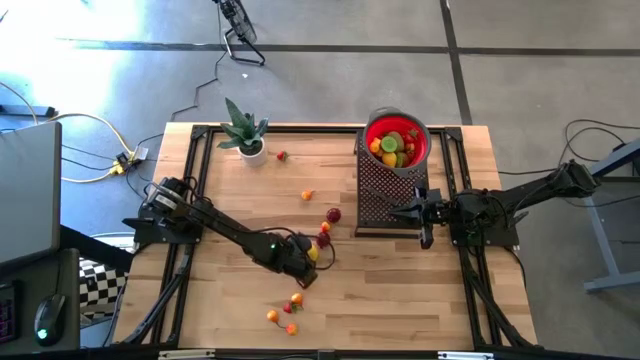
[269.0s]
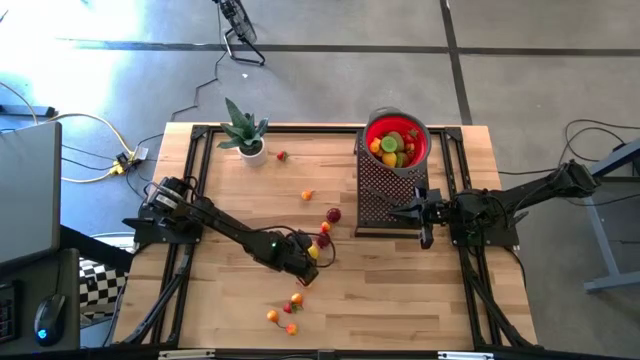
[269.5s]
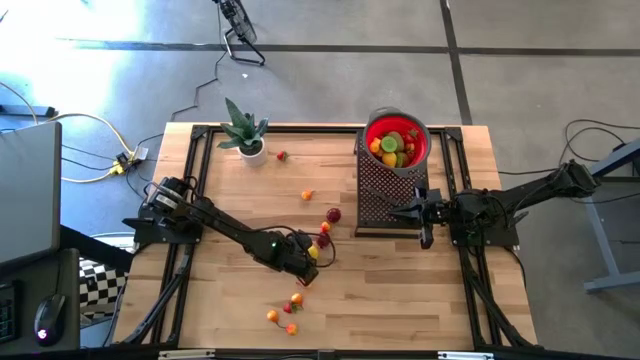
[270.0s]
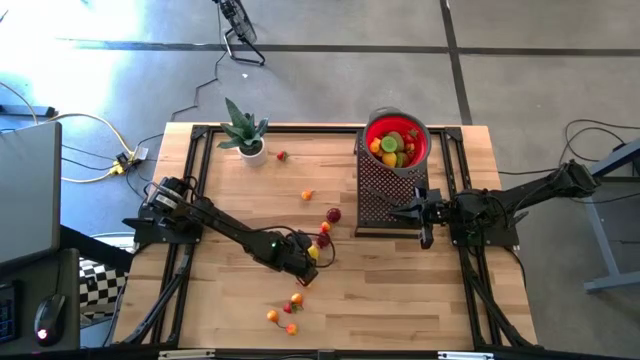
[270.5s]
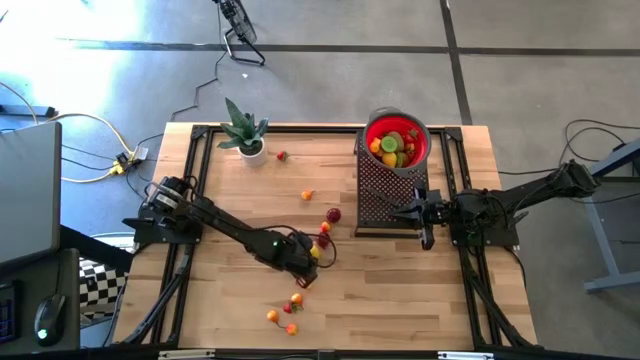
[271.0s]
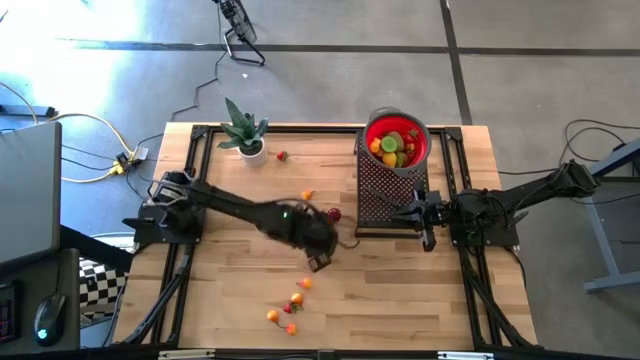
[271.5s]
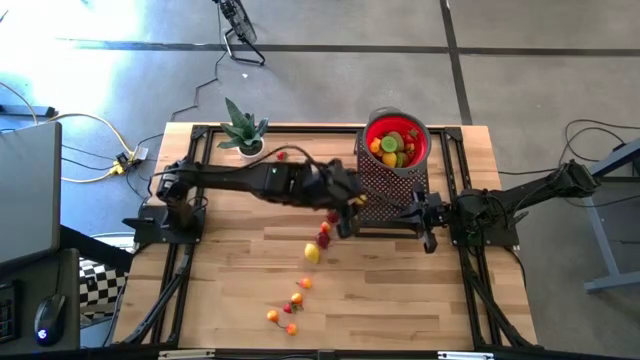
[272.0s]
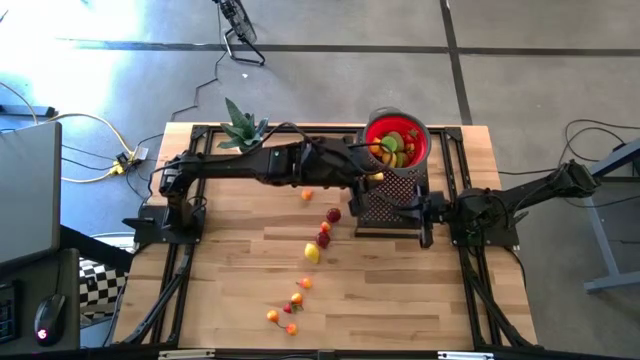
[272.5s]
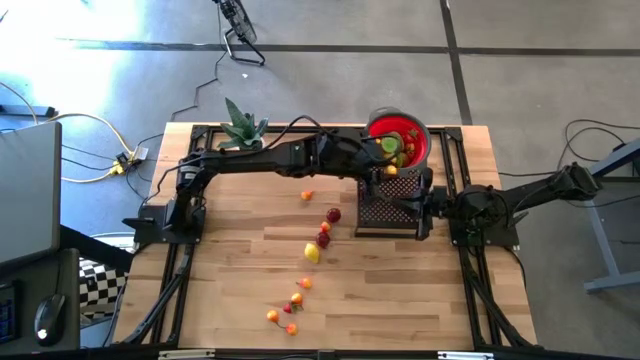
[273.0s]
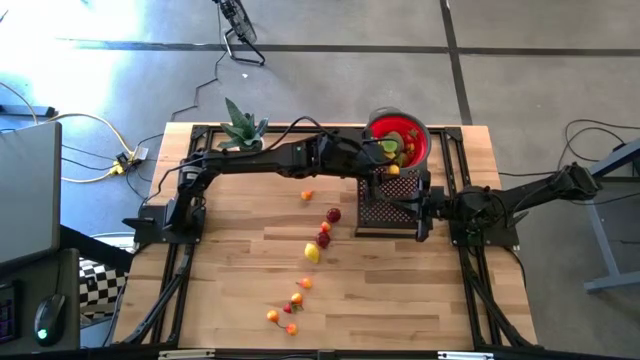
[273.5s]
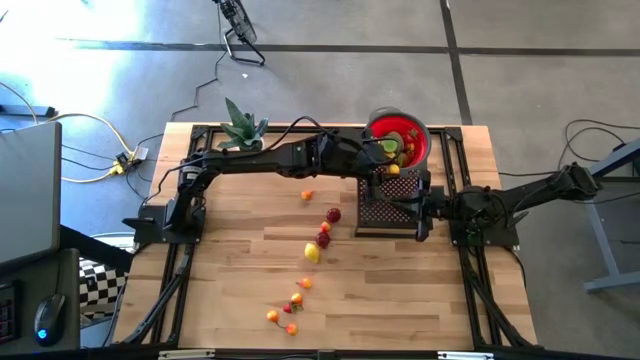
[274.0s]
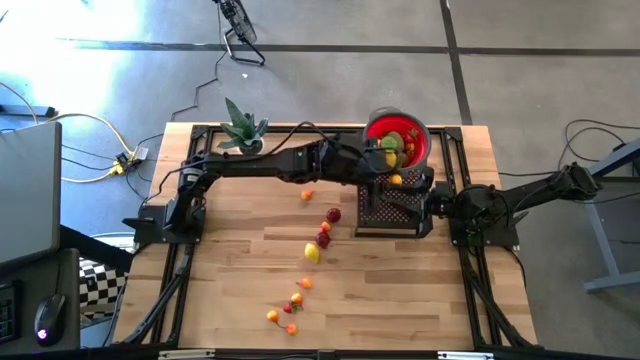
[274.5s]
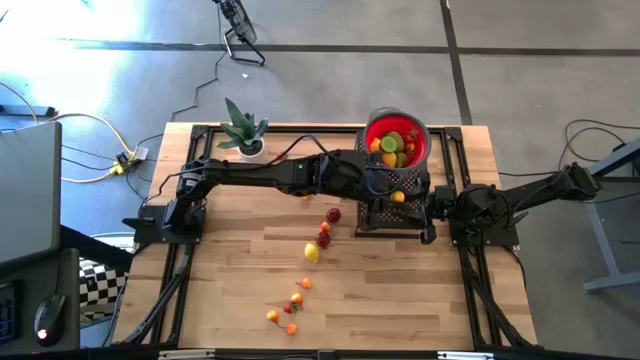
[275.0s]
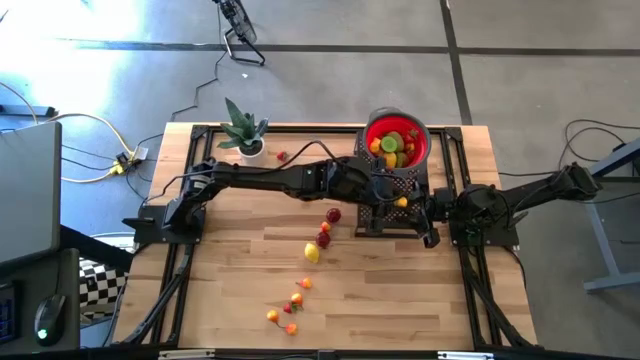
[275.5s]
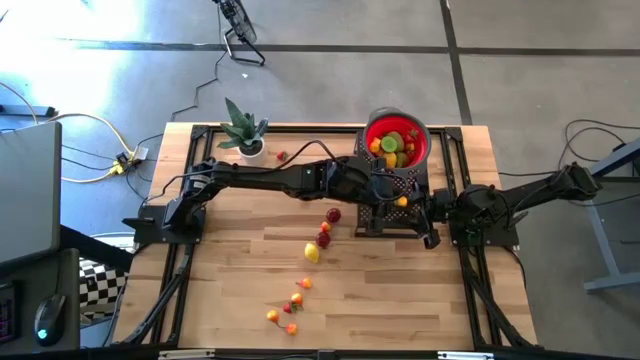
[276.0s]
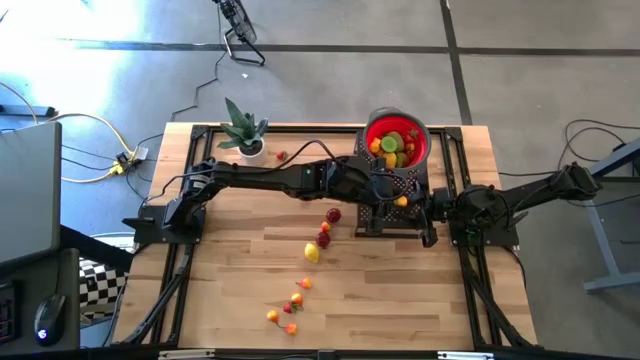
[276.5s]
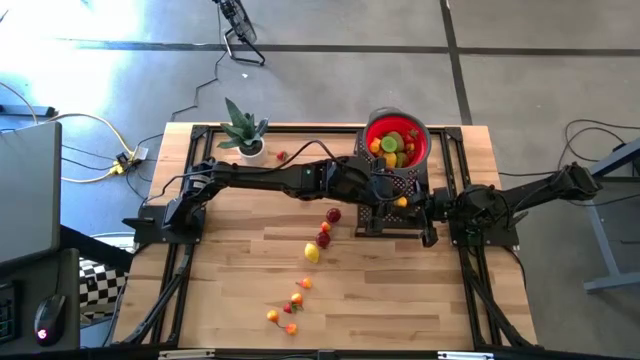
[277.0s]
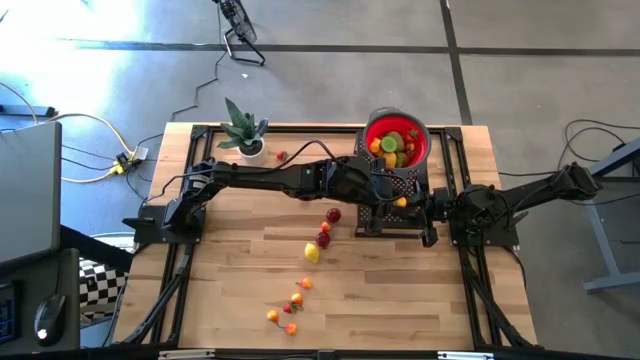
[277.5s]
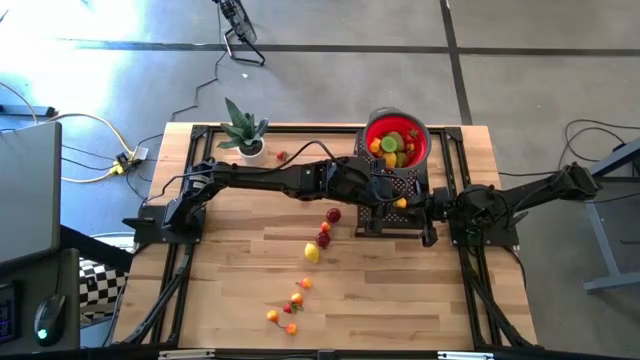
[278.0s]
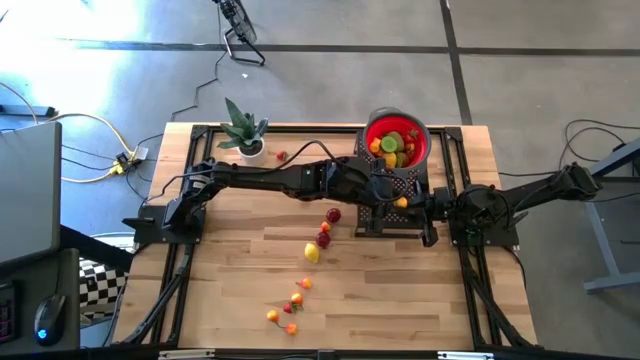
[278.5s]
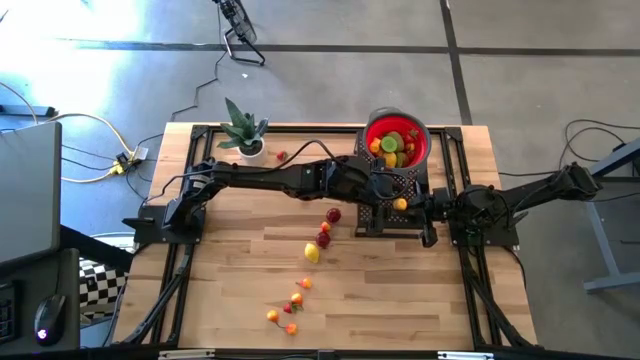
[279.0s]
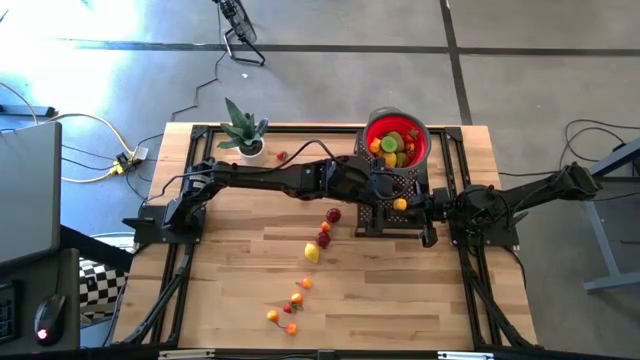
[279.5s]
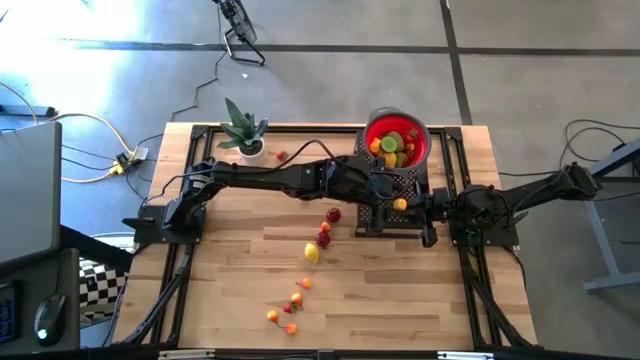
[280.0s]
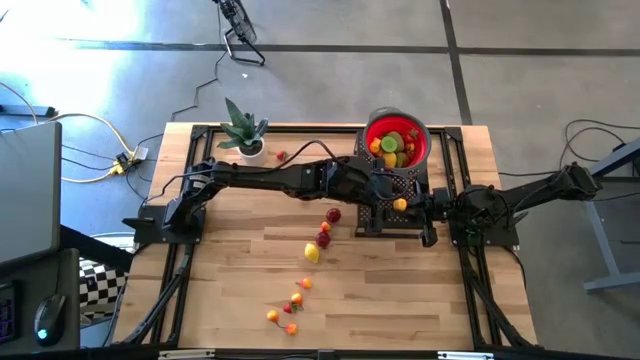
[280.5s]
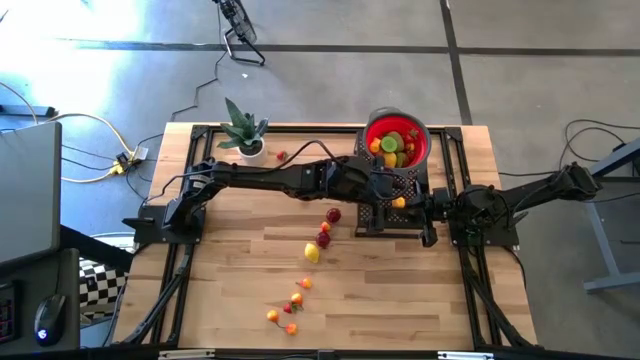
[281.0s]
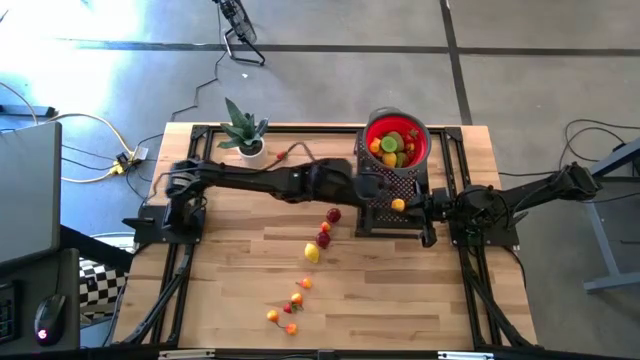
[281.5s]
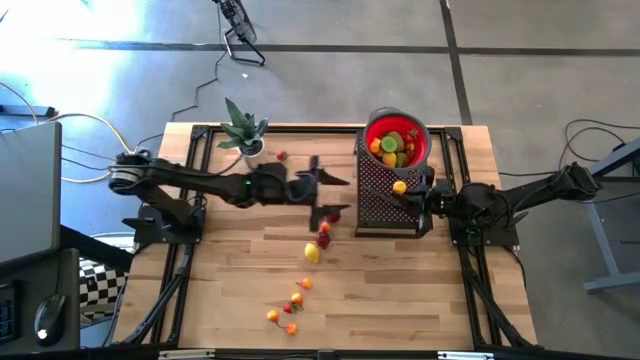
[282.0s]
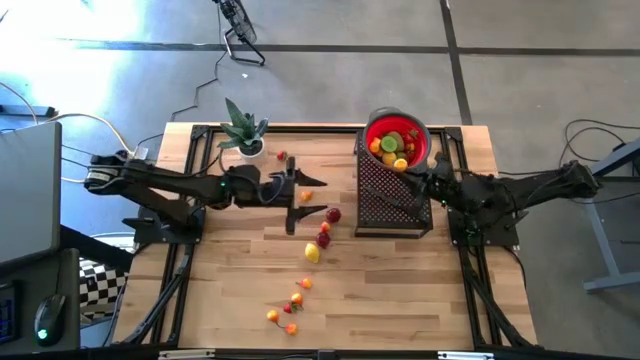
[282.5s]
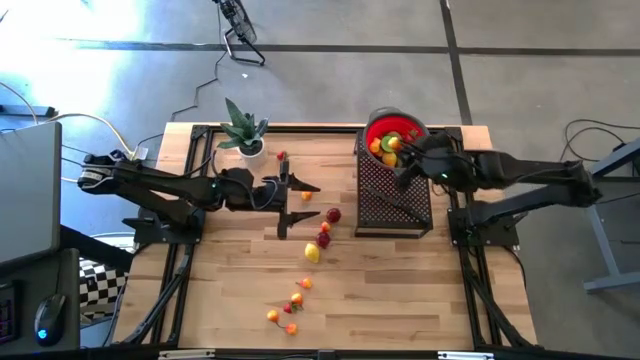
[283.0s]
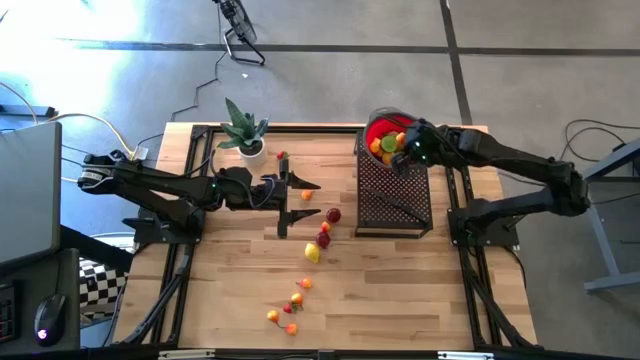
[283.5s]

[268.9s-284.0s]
Task: Pick & Place Fruit
Put the pear into the strainer bowl on the shelf

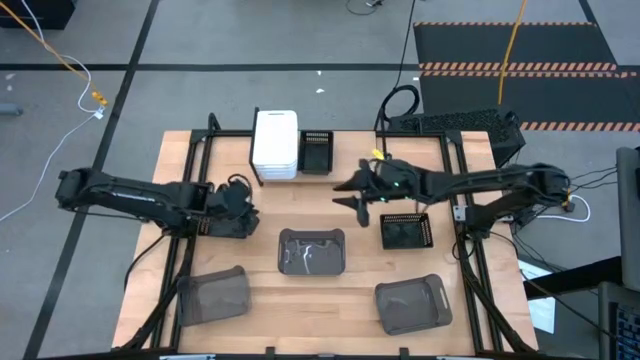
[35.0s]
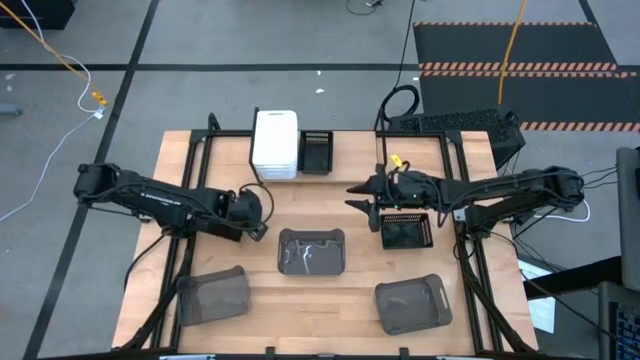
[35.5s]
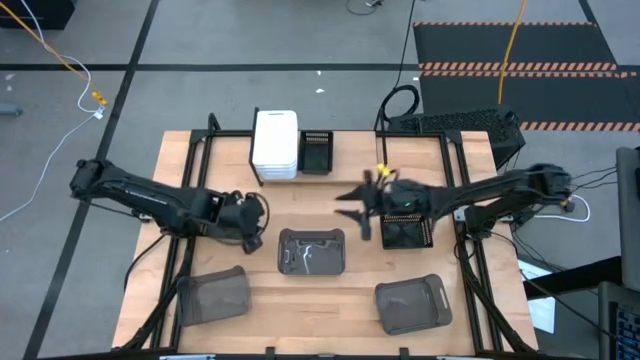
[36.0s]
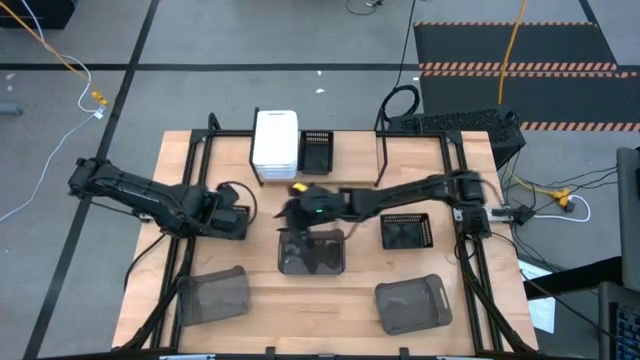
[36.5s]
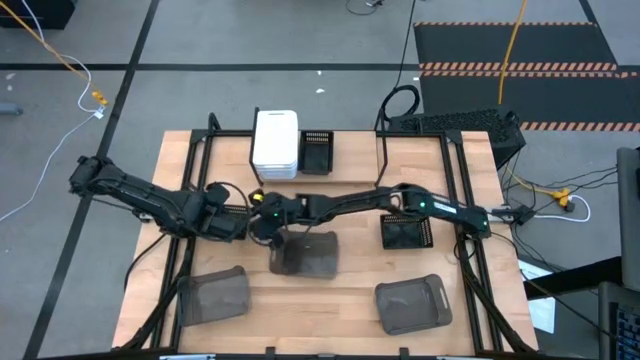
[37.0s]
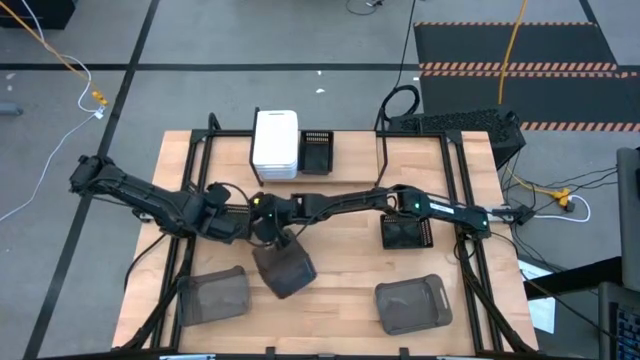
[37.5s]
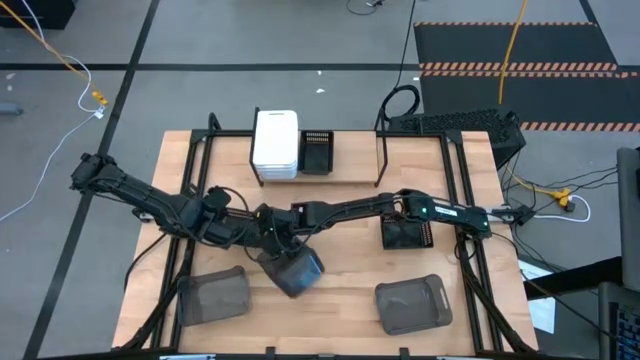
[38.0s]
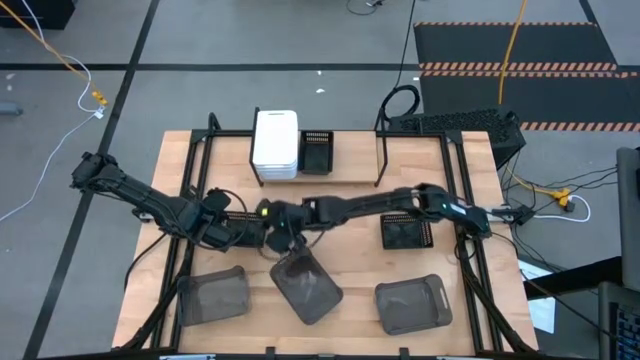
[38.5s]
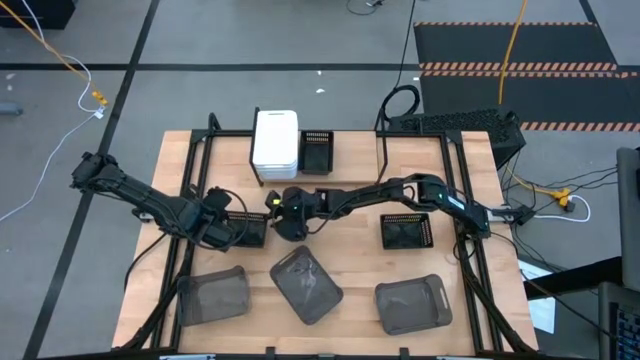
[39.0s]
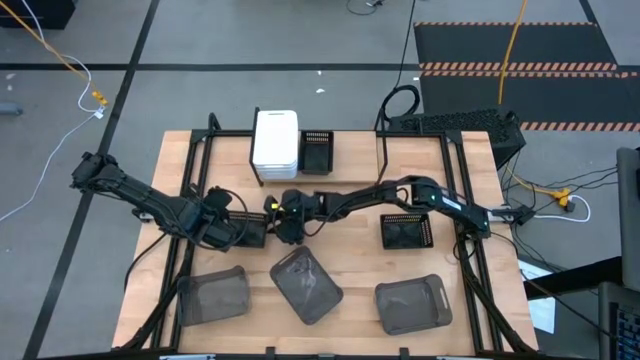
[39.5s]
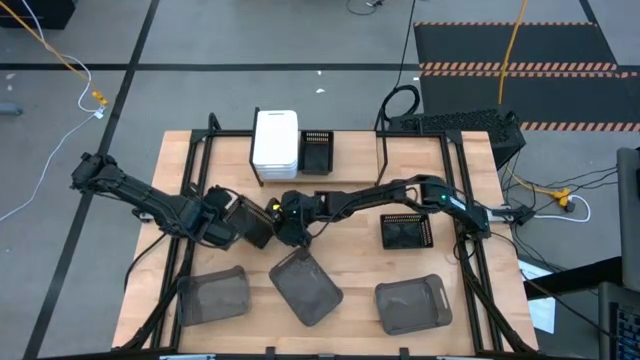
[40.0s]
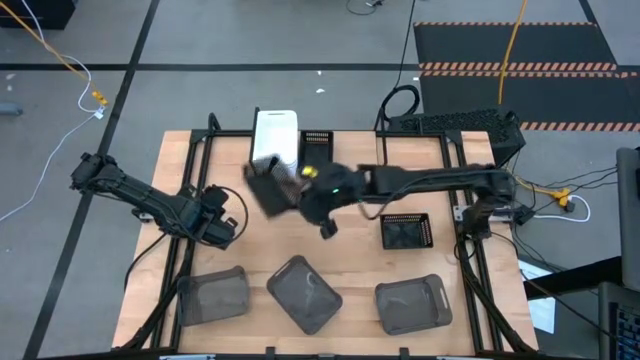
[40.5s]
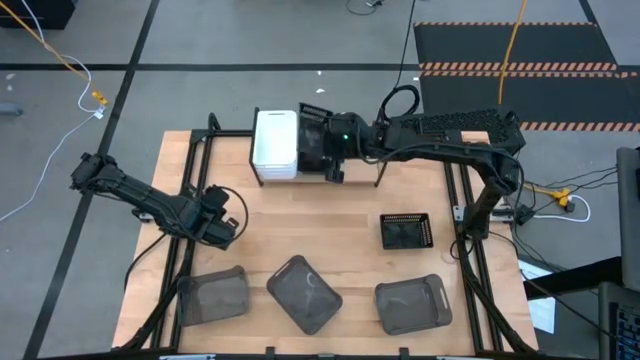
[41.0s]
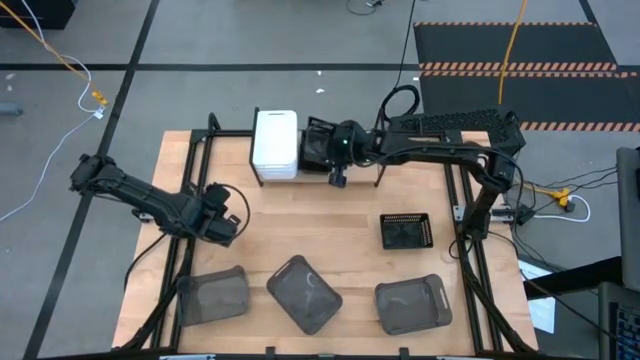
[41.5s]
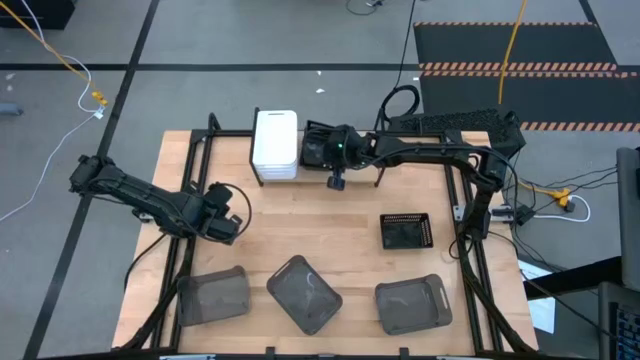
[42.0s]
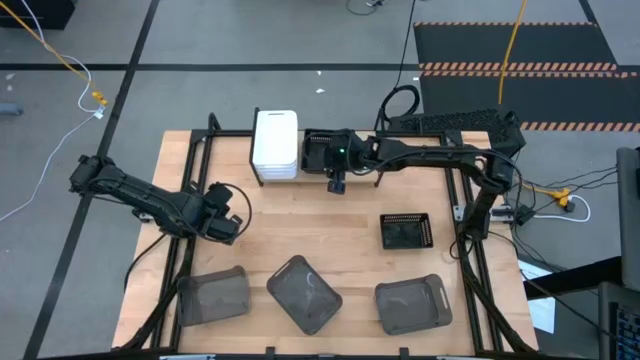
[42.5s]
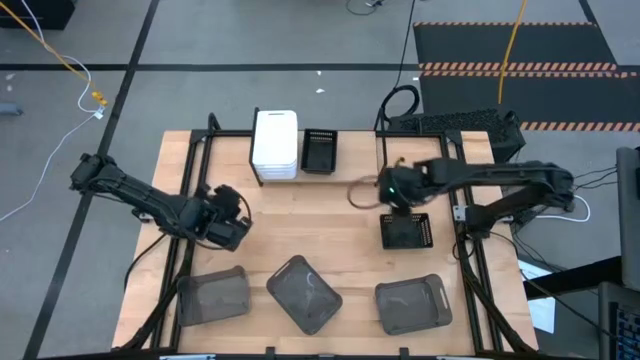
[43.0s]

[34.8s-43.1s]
Task: Stack baskets on shelf by color
Stack the left black bin on top of the other black bin on the shelf
